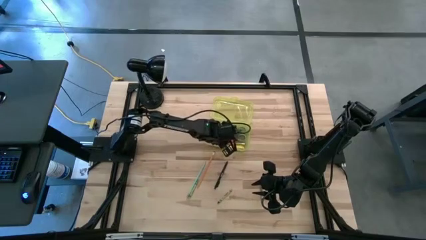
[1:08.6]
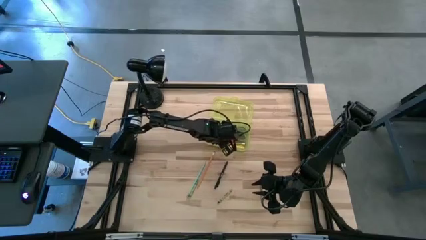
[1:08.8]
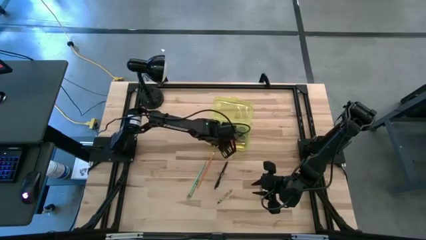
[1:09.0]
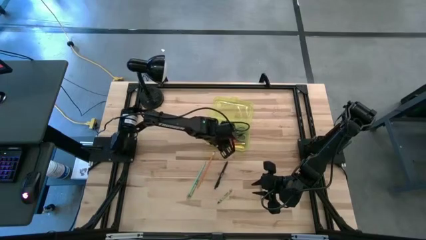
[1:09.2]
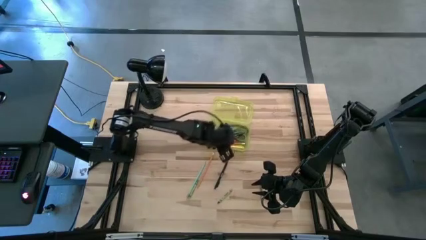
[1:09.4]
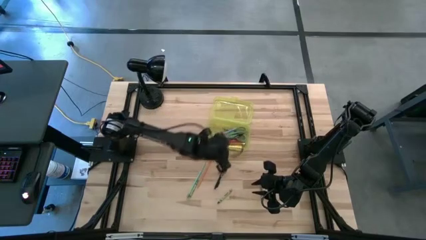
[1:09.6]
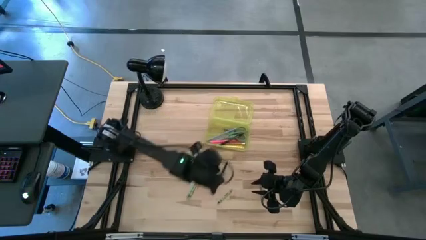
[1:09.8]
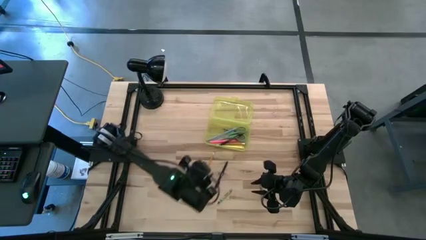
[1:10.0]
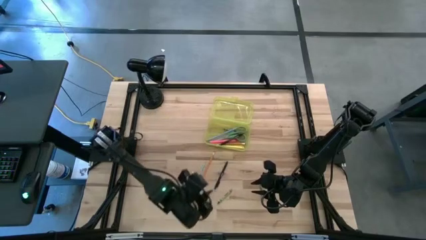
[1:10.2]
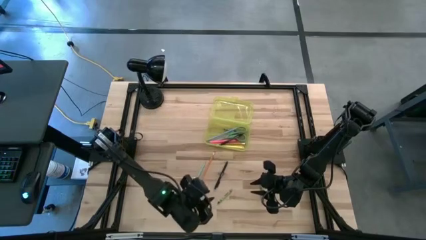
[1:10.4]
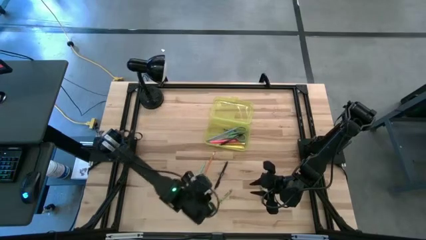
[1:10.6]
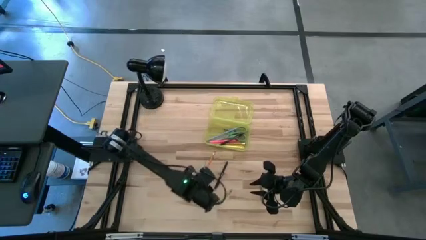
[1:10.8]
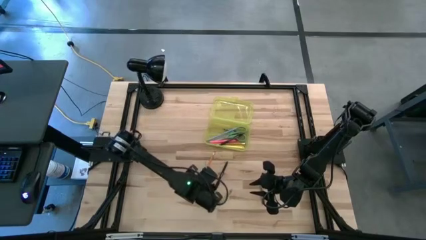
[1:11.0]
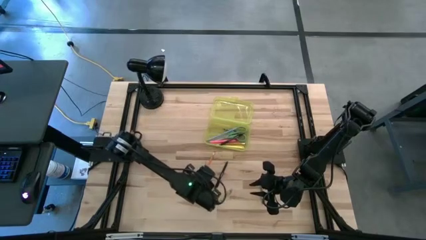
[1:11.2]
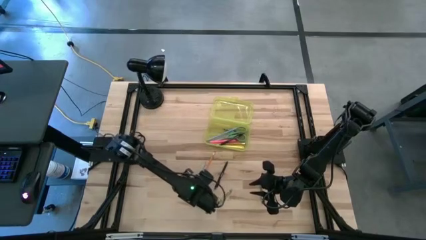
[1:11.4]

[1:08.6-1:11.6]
Task: Pick & place school supplies into a supply box
Put the blue pencil into the yellow supply box

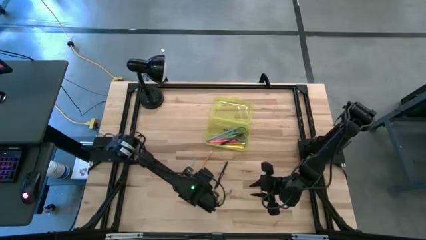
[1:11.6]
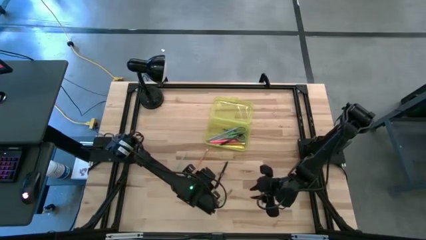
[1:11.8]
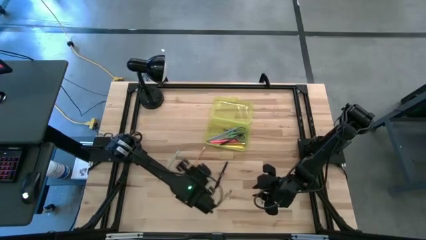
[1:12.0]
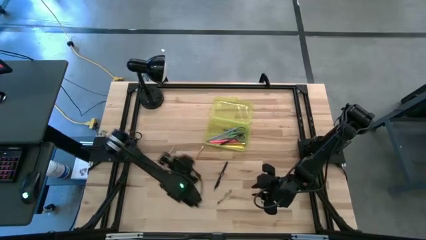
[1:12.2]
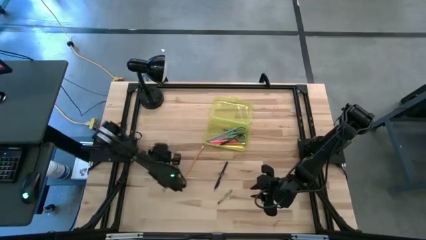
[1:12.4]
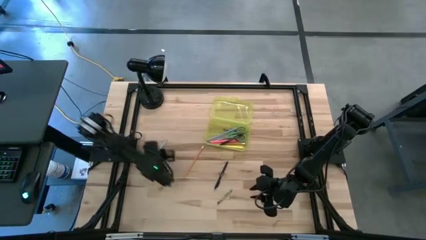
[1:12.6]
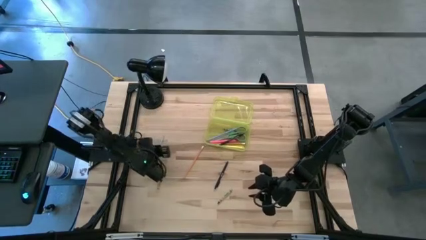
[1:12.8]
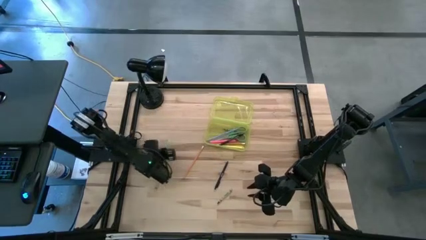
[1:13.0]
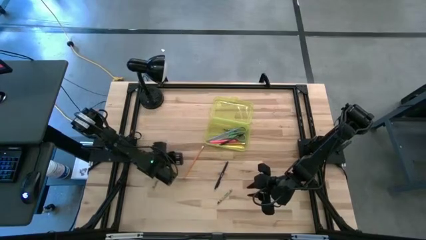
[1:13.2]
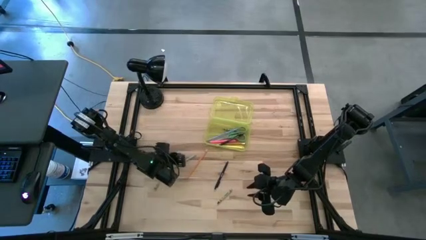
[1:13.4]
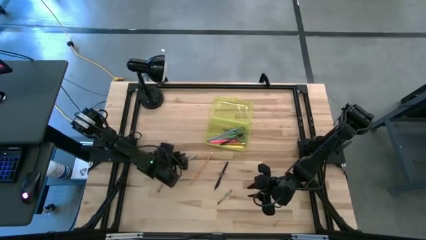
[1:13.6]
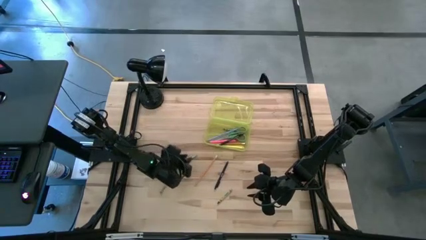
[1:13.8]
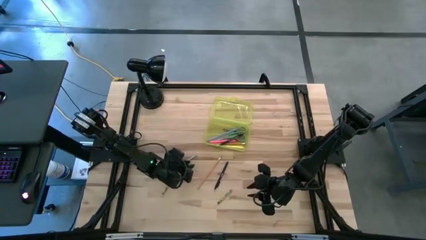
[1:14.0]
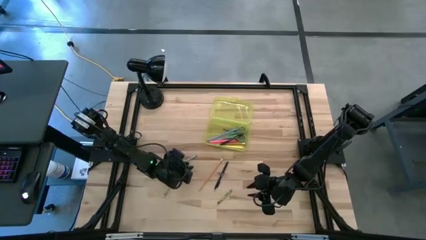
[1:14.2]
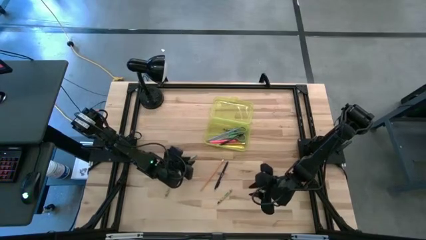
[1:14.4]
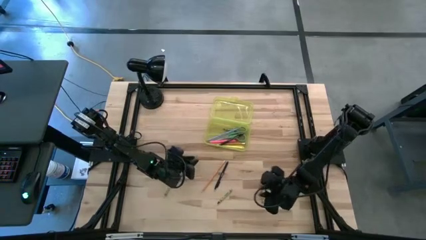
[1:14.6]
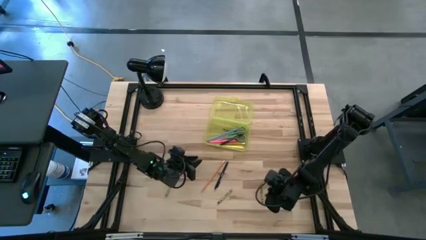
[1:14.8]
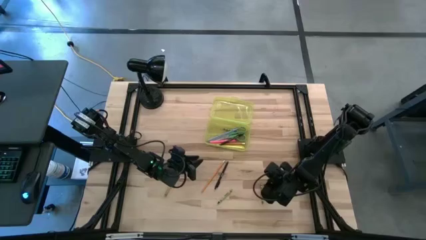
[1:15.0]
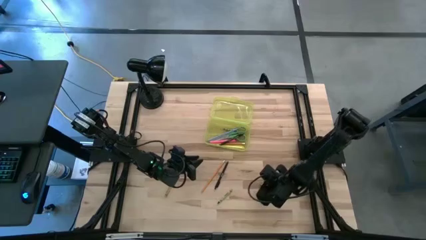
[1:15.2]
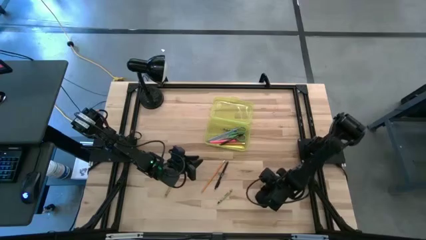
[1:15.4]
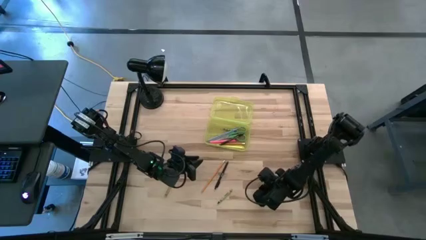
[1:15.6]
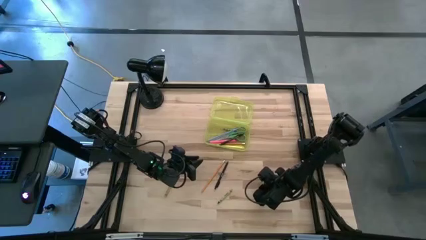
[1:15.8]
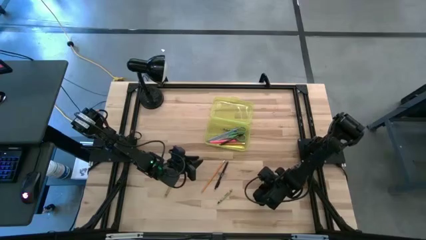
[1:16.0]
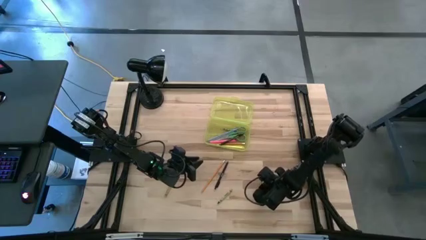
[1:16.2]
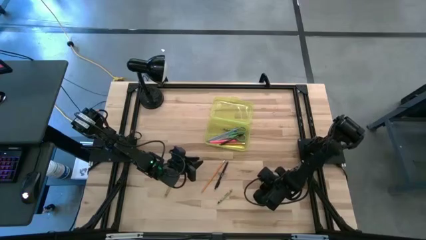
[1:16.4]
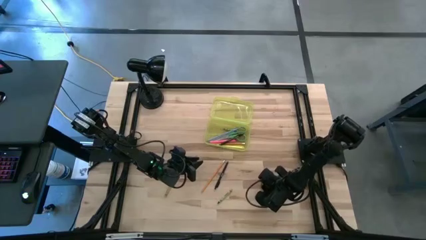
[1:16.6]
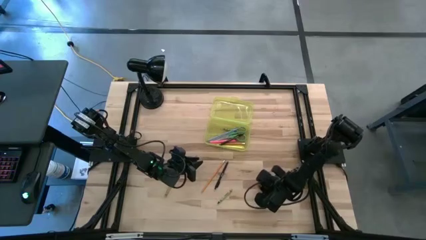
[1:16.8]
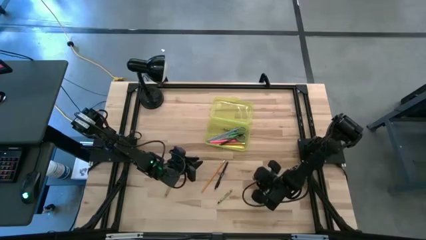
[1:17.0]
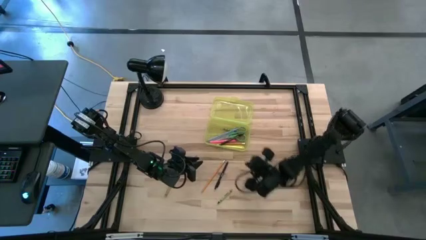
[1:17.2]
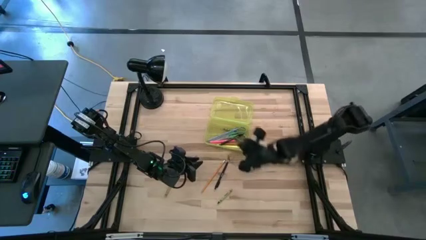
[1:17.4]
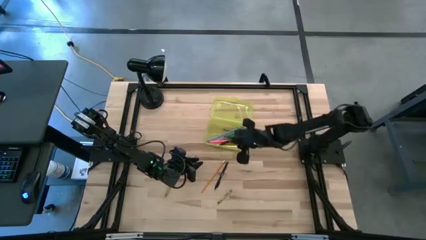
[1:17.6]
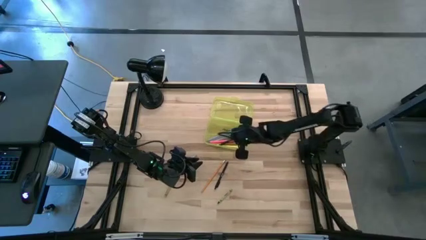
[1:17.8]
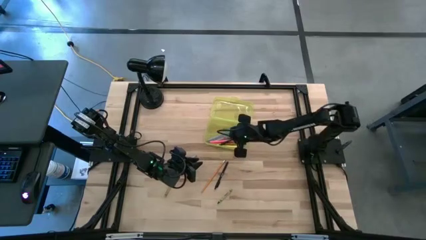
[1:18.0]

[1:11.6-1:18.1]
Put the right light green crayon into the yellow supply box

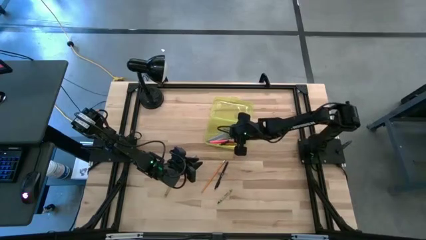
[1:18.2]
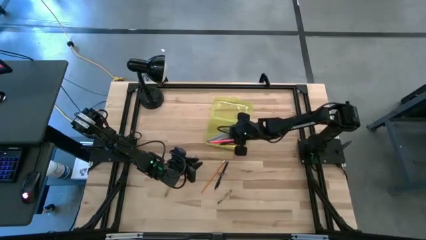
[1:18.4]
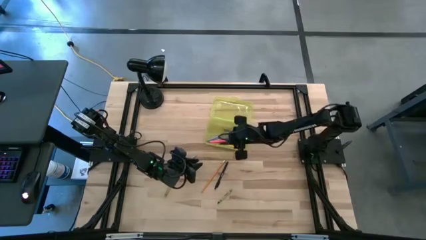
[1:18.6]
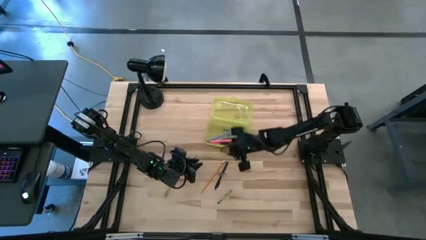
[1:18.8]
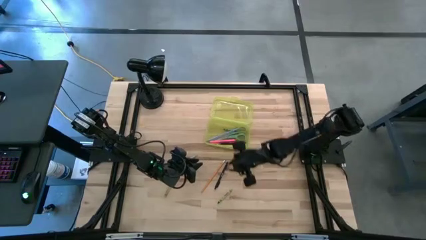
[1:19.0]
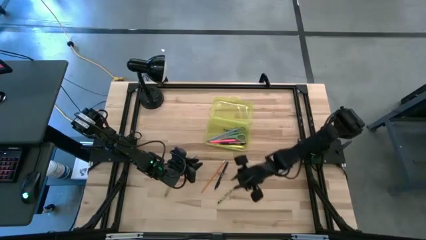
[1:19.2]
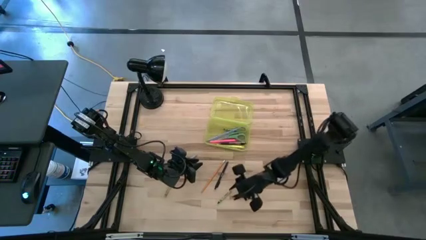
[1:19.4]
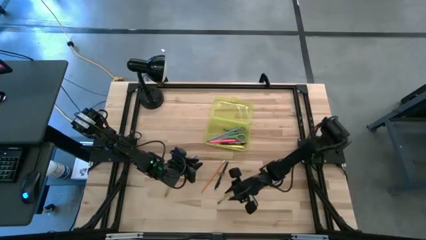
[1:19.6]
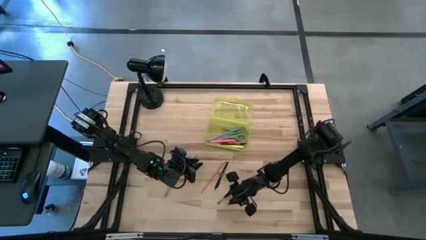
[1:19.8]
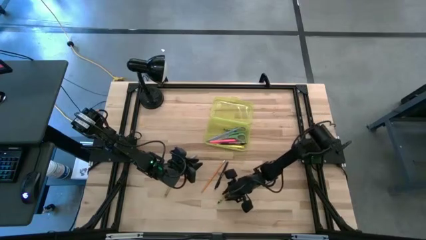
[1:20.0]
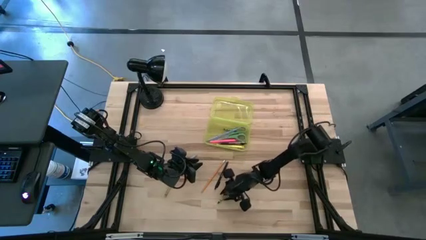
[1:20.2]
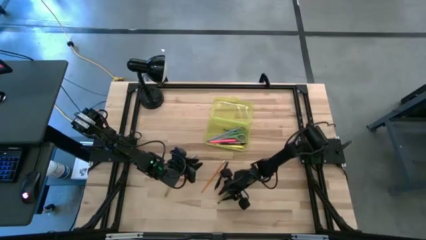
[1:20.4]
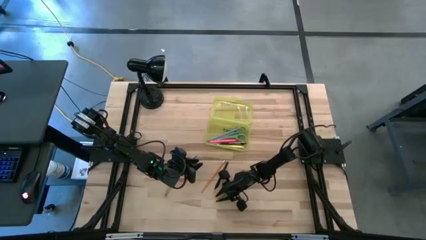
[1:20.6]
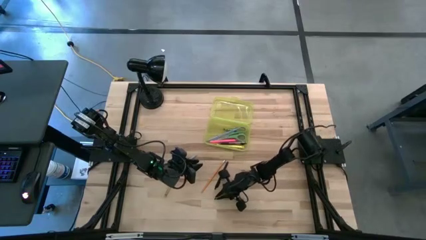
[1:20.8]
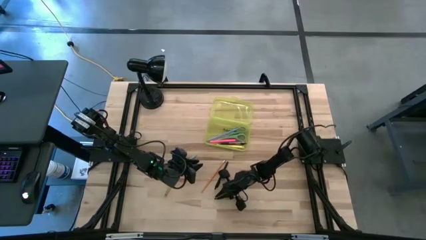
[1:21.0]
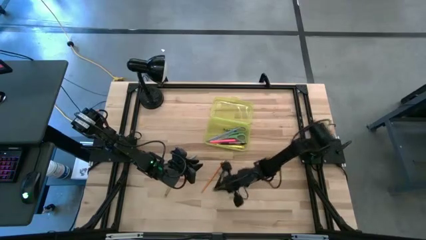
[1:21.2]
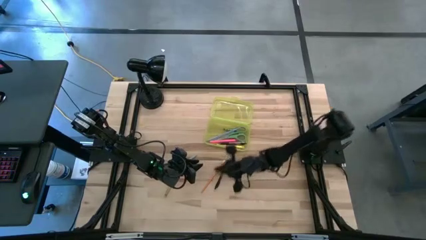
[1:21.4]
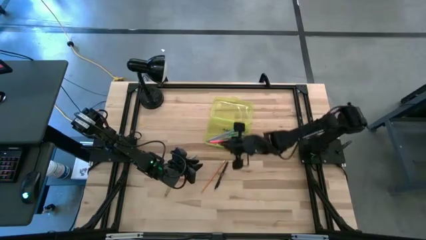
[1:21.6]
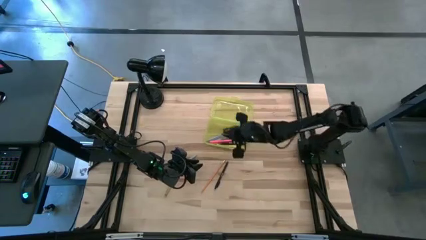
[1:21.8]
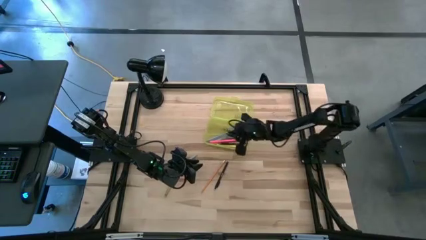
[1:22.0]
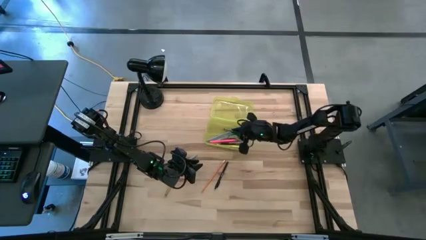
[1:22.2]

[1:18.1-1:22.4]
Put the green crayon into the yellow supply box

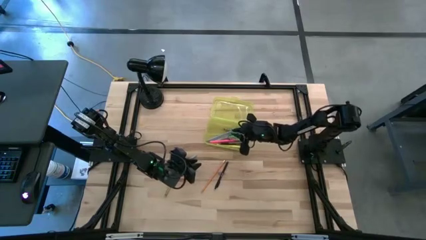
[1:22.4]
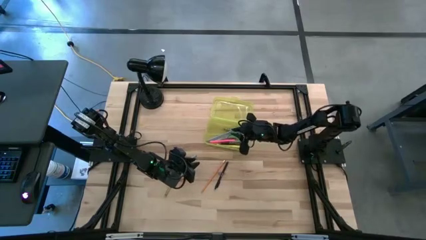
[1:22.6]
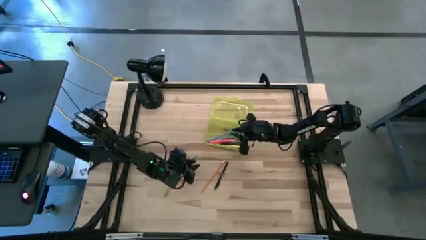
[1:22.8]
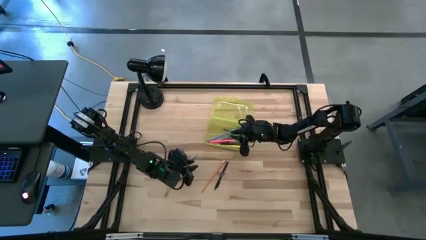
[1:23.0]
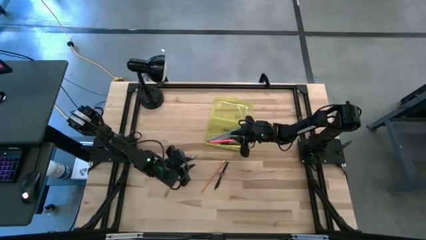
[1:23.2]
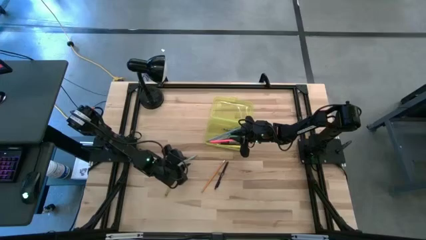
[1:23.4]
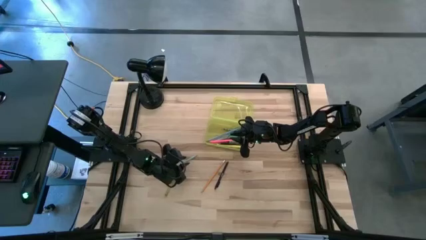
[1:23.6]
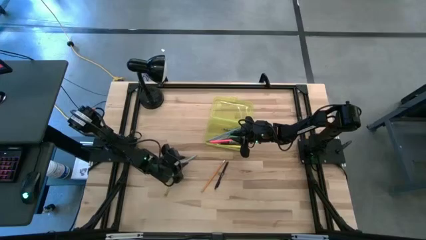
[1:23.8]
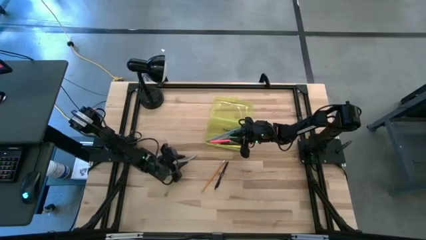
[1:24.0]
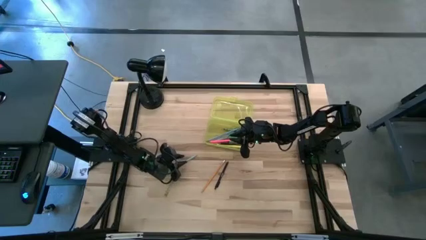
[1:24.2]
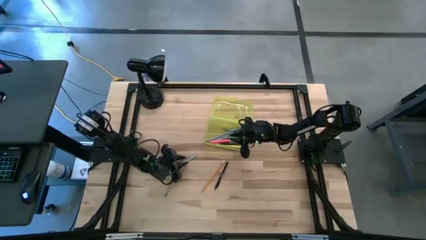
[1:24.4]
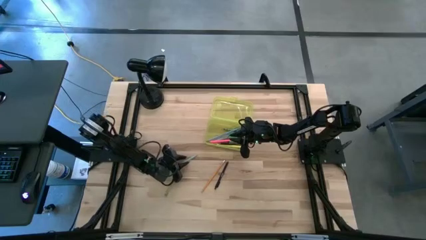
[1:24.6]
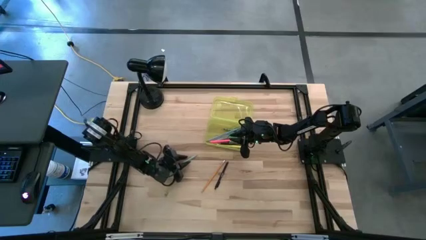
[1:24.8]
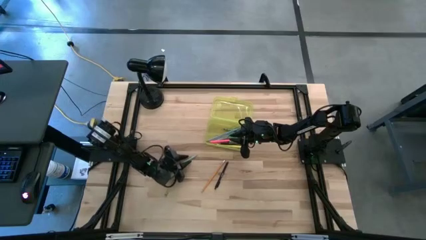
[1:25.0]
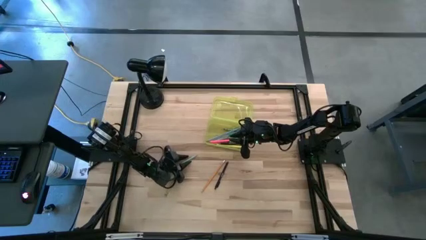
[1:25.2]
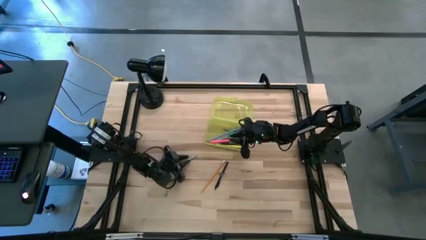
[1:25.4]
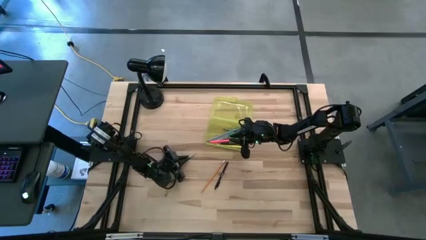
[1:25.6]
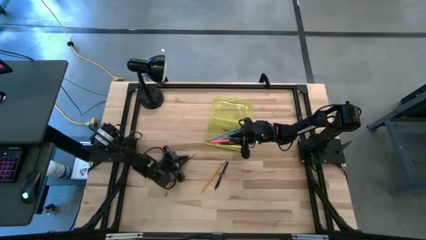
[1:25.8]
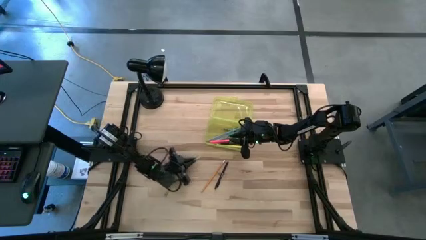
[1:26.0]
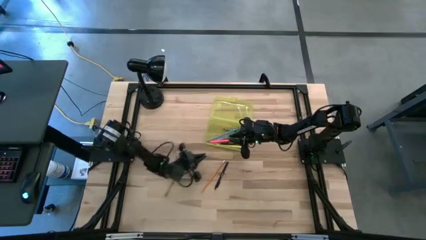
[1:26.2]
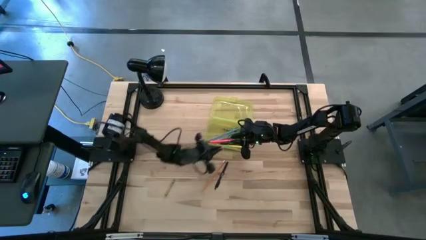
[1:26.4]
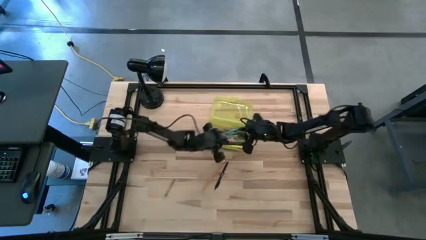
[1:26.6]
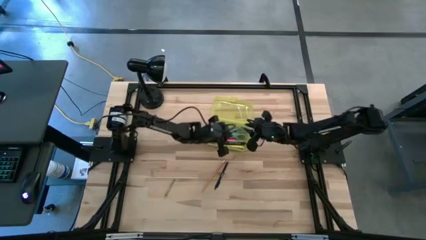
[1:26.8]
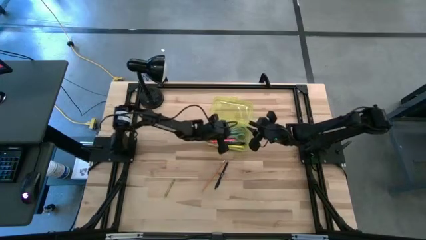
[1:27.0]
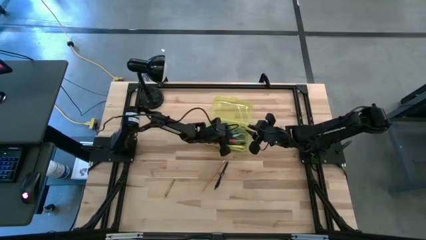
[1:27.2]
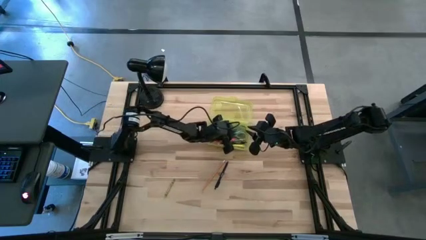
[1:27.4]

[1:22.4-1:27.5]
Put the blue pencil into the yellow supply box
